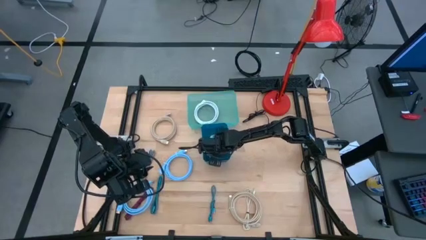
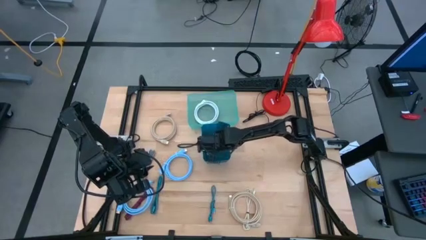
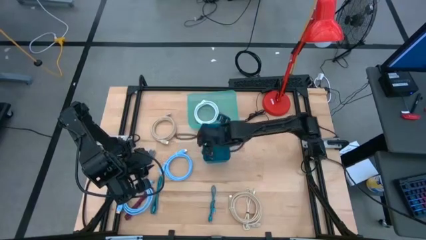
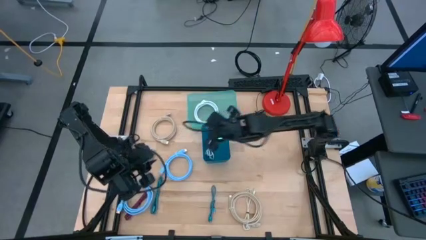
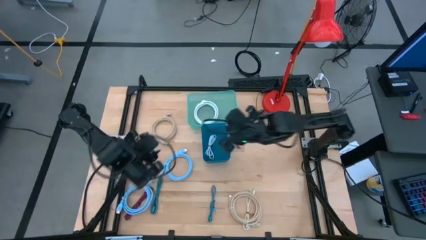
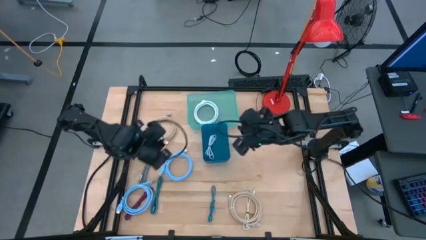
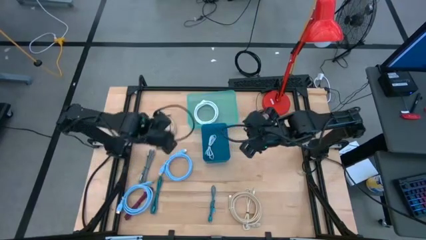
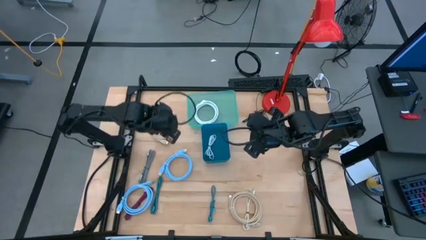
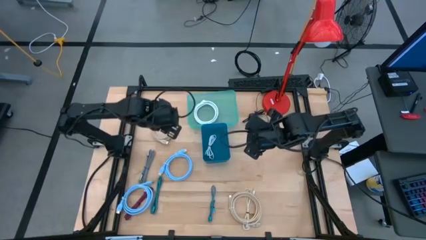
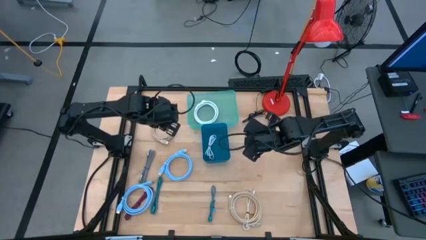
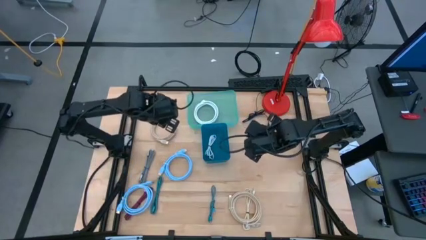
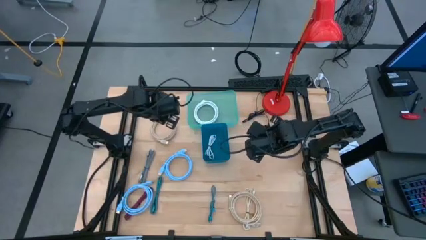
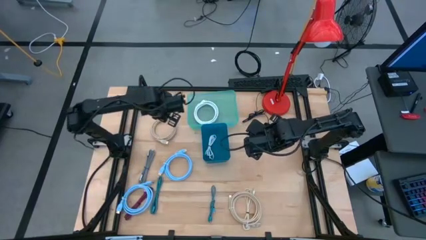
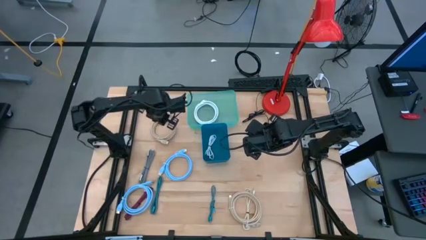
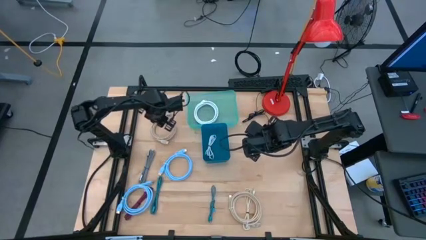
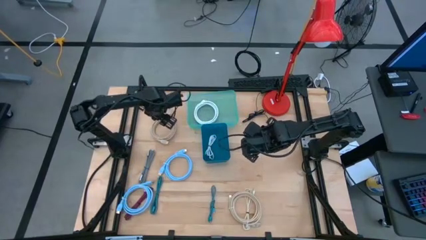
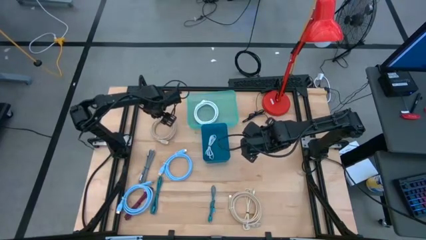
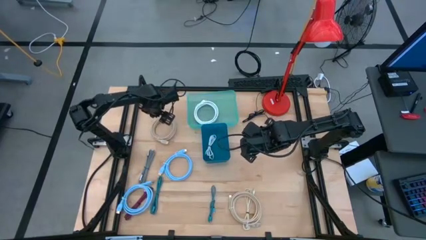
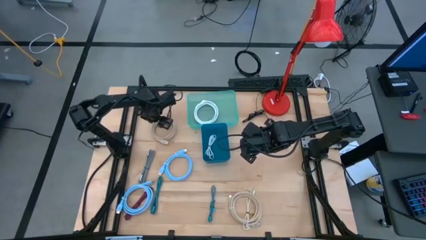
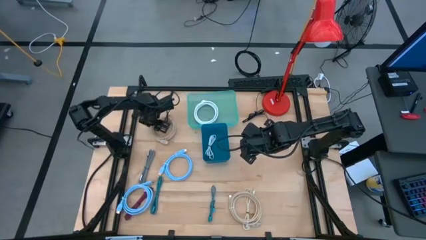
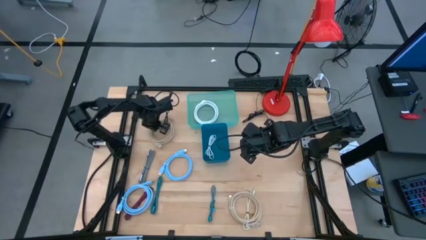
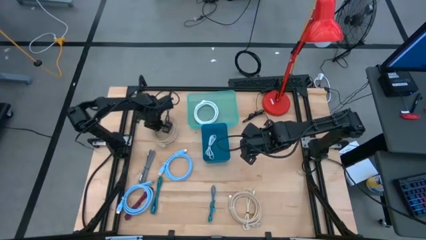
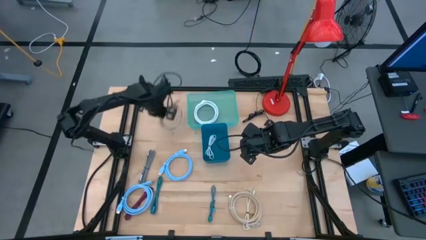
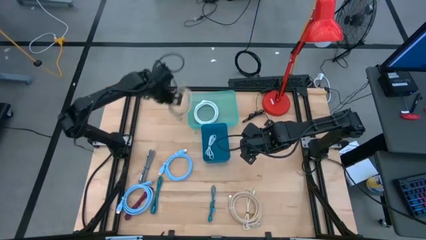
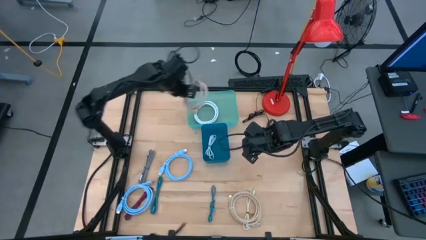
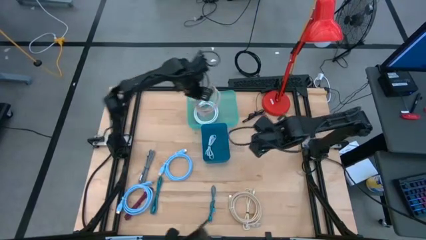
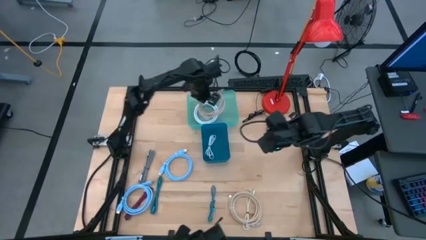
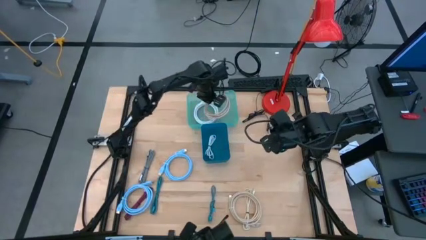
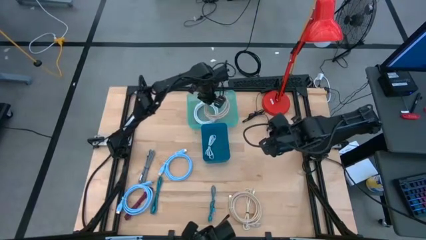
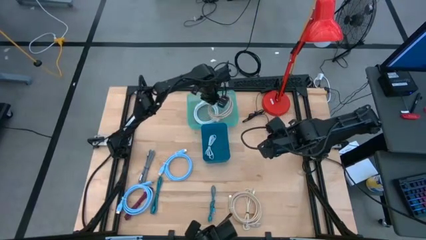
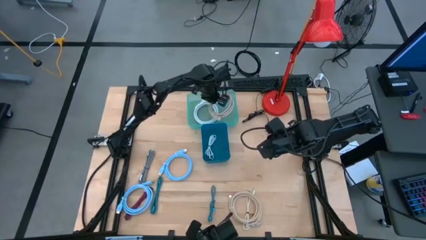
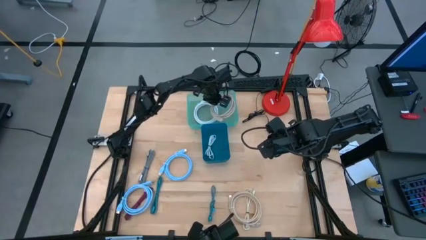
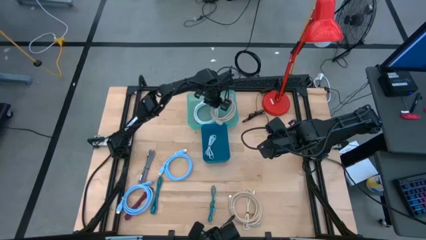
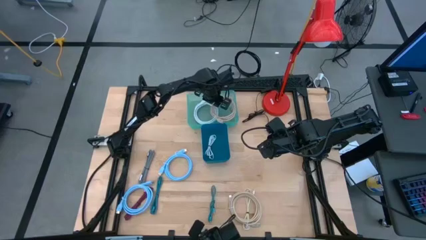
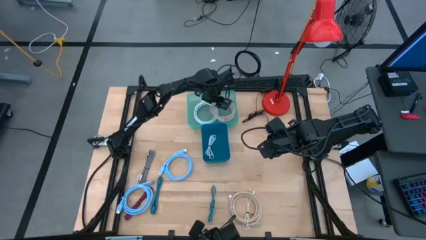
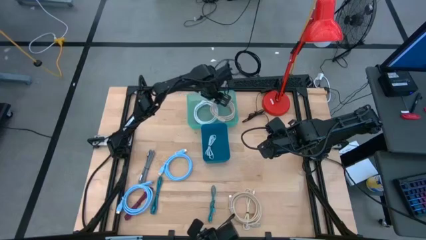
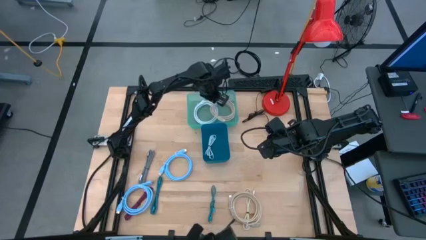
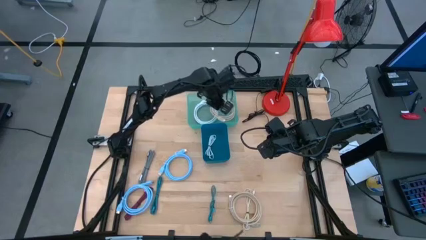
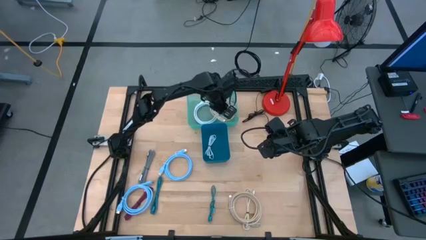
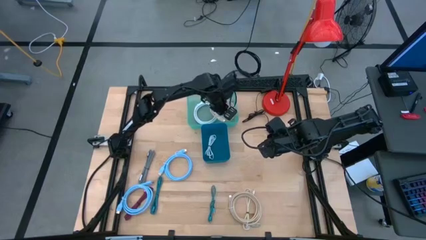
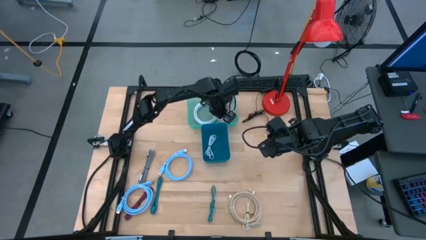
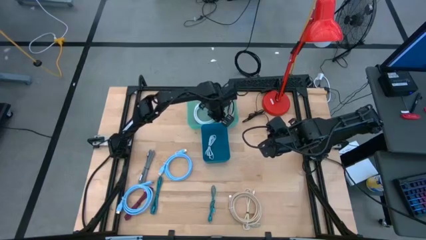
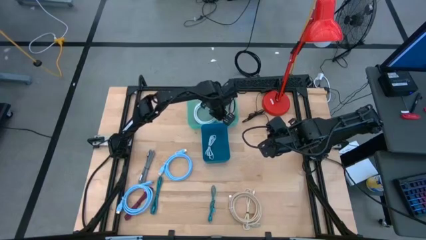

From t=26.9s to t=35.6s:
Task: Pick & Place USB Port
Put the top light brown HDMI cable into the green bin

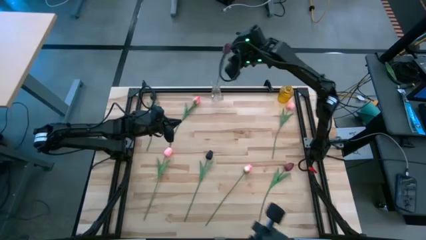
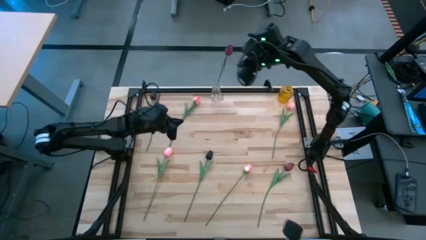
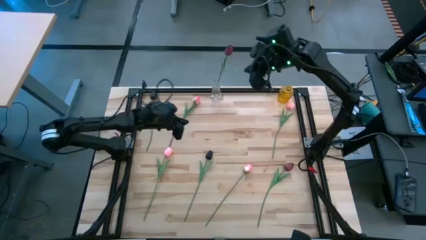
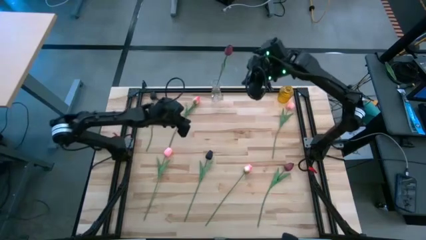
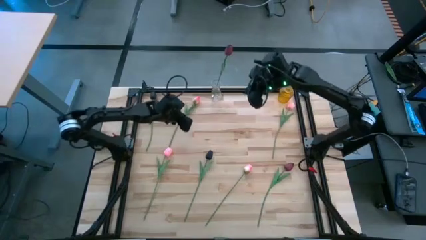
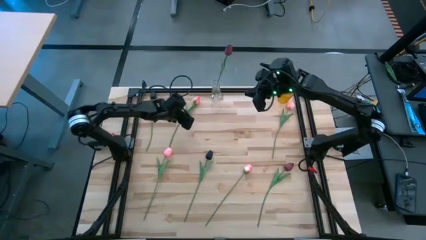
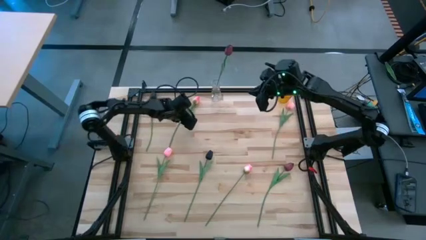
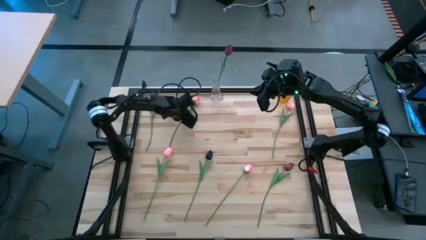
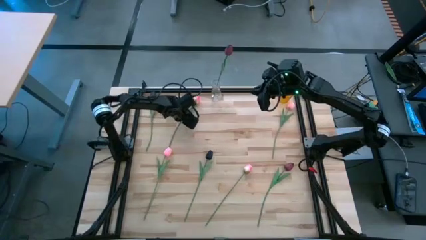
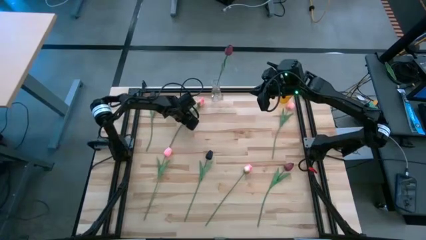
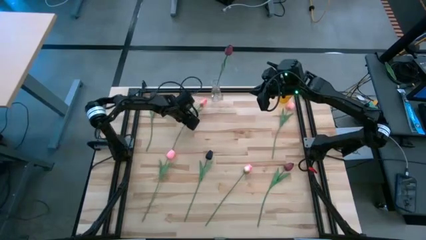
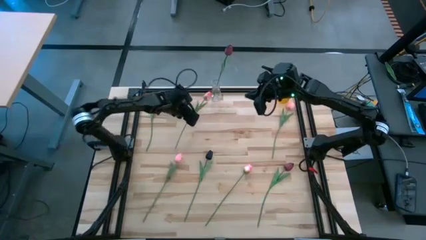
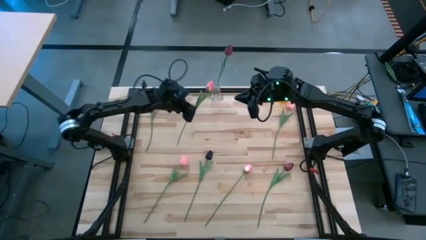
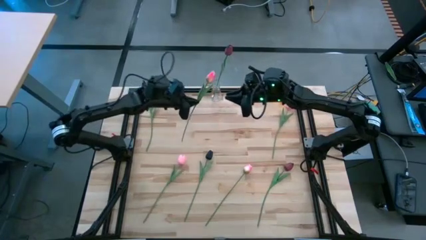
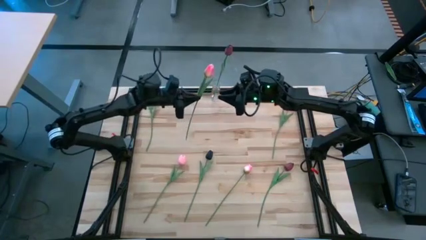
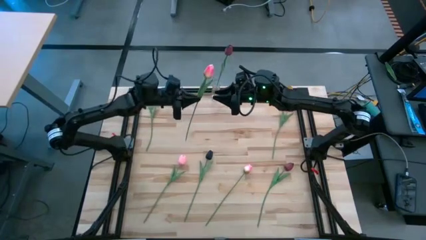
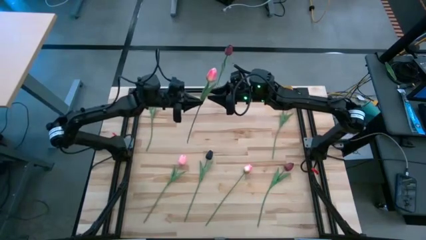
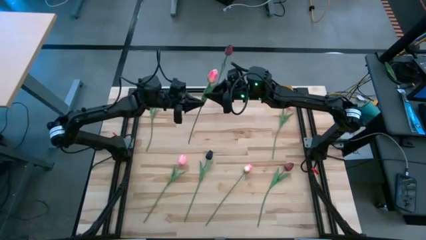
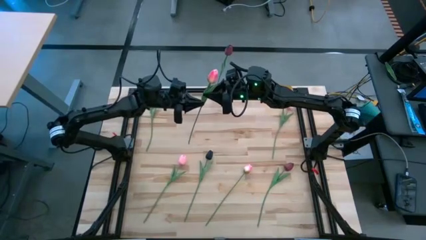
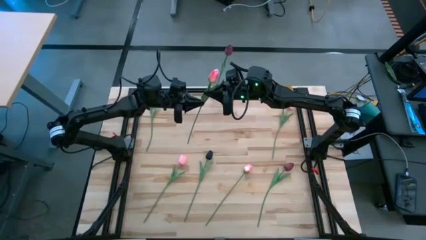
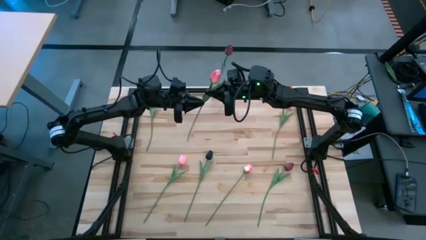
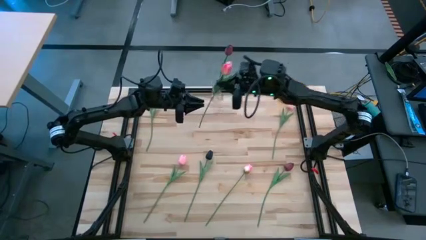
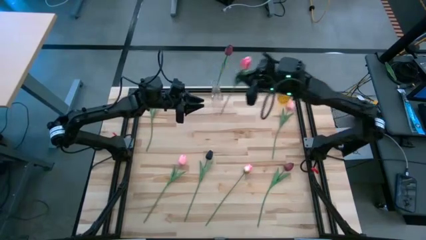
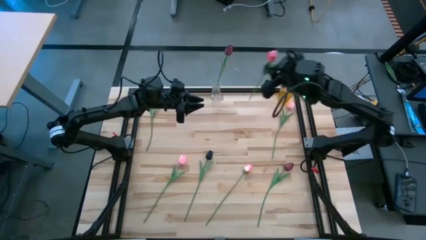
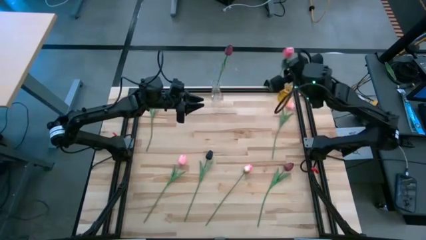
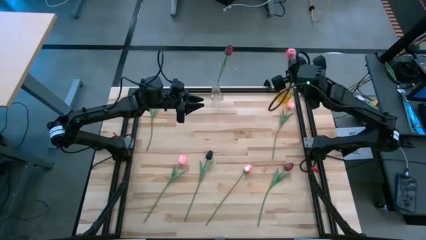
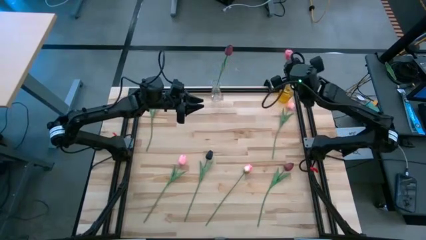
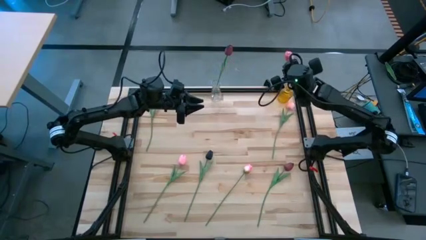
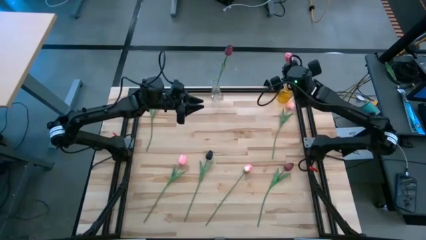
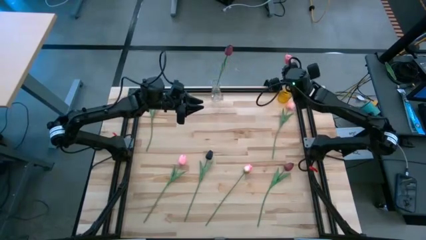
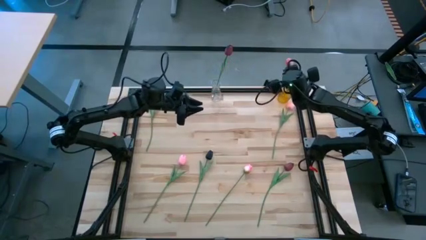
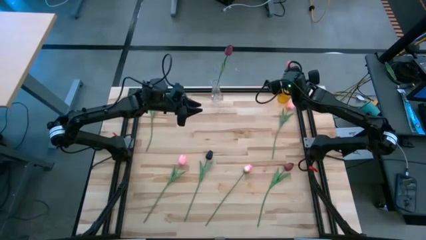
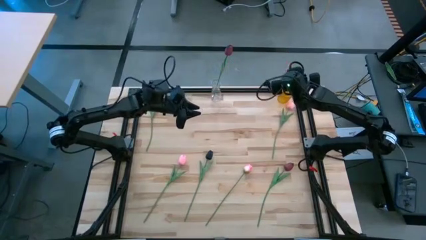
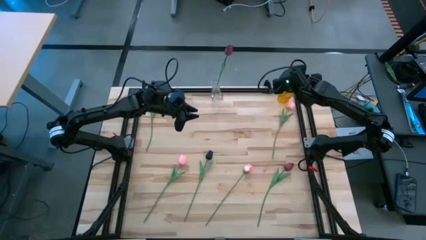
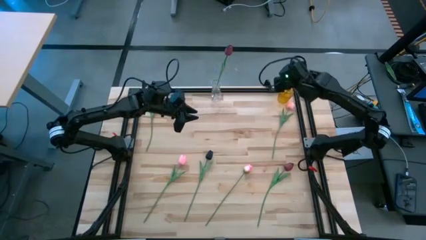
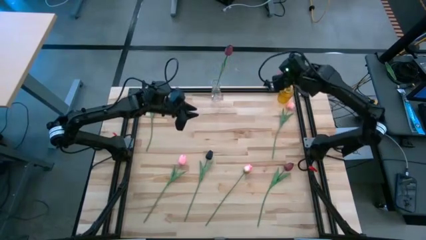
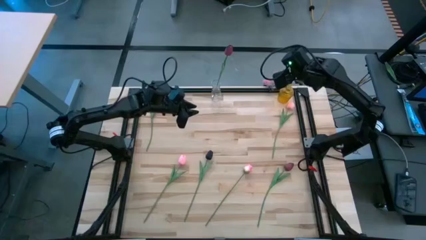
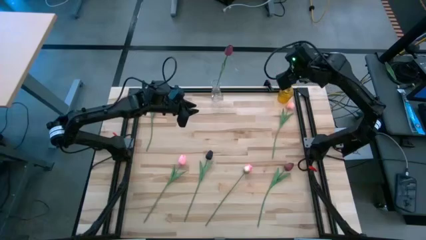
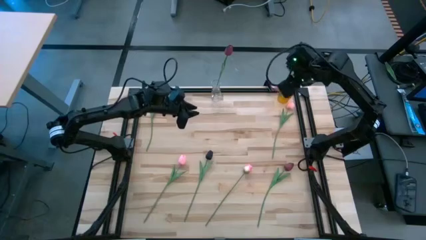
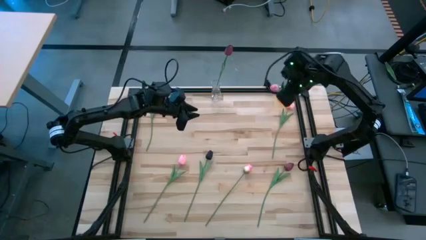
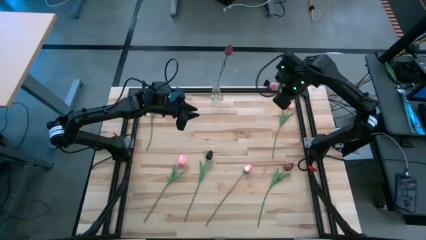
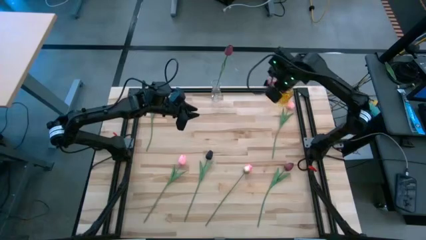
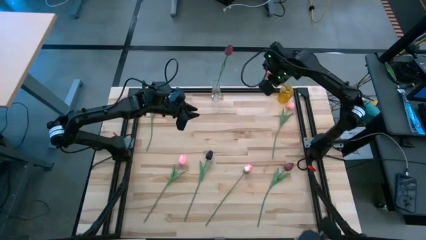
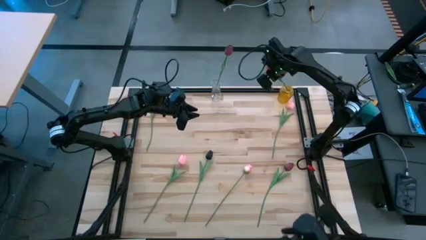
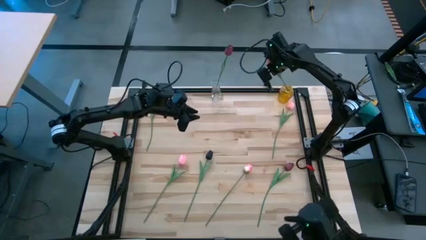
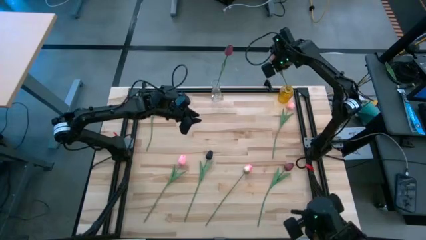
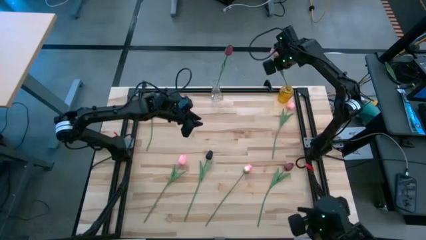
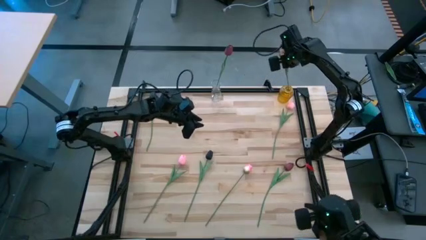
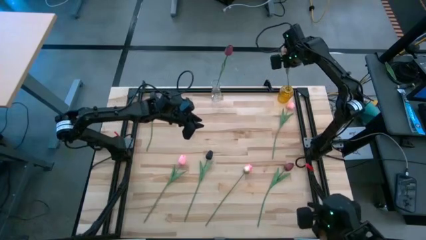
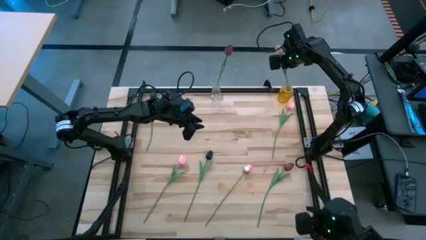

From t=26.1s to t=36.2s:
Task: Sort flowers into vase by color
Put the top left pink tulip into the yellow crystal vase
